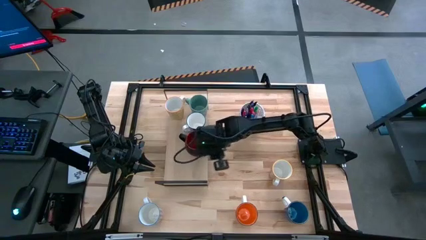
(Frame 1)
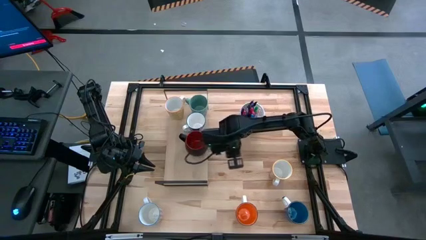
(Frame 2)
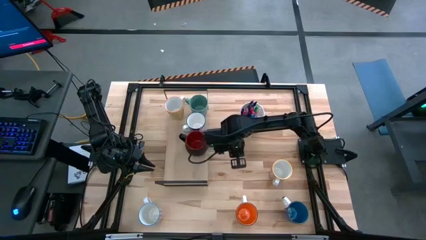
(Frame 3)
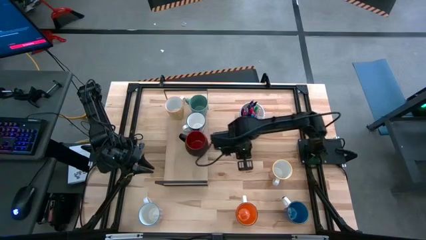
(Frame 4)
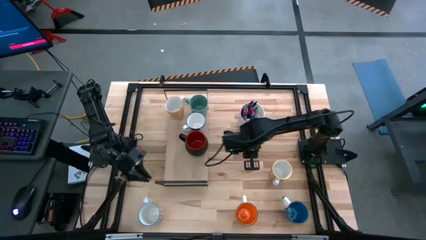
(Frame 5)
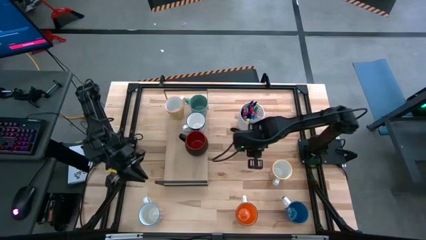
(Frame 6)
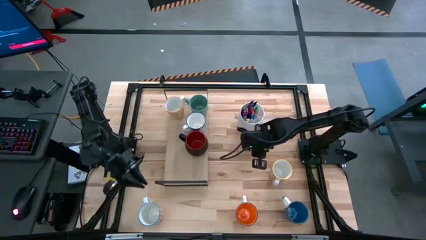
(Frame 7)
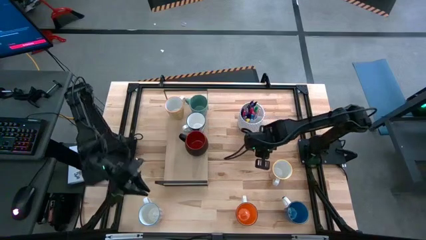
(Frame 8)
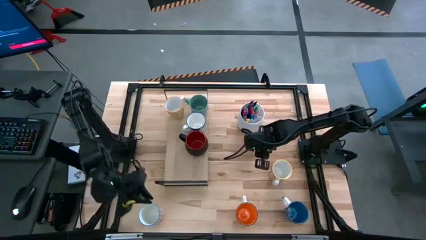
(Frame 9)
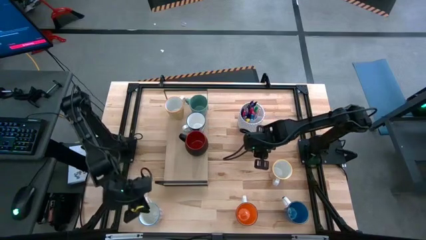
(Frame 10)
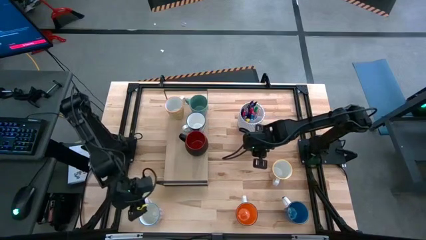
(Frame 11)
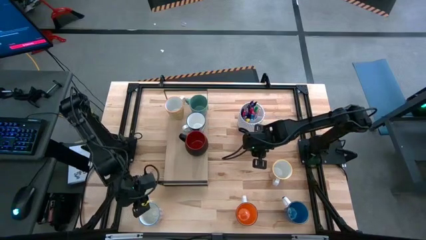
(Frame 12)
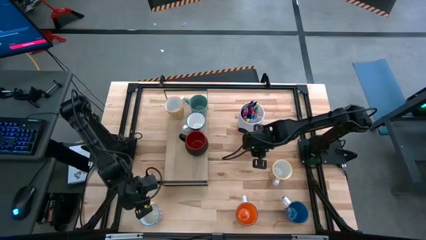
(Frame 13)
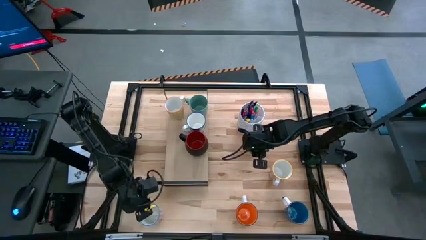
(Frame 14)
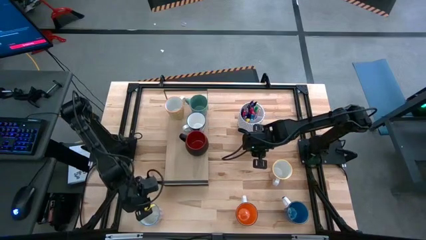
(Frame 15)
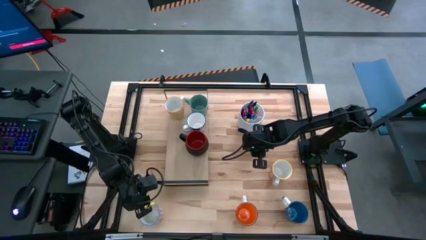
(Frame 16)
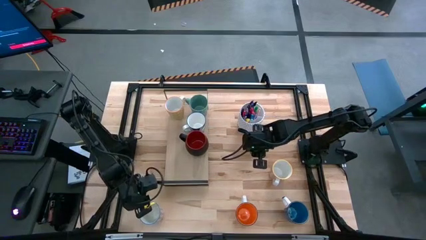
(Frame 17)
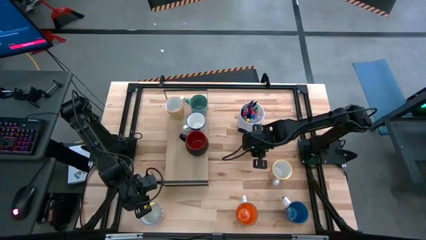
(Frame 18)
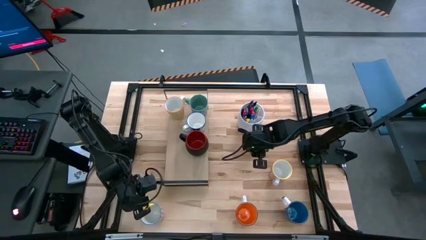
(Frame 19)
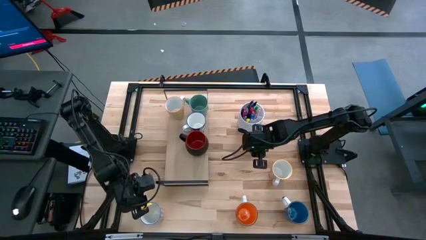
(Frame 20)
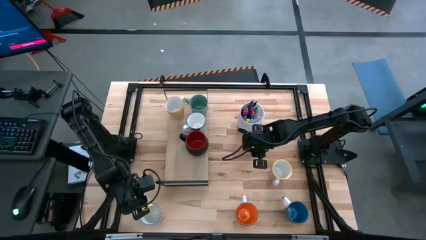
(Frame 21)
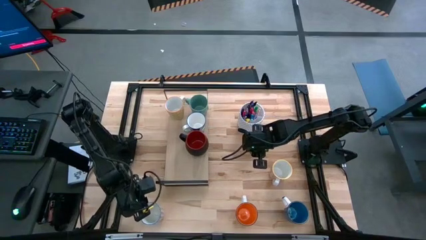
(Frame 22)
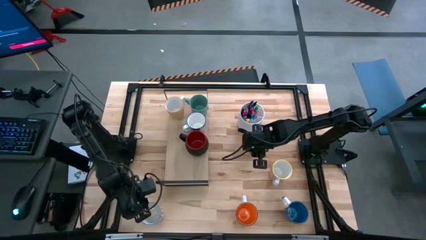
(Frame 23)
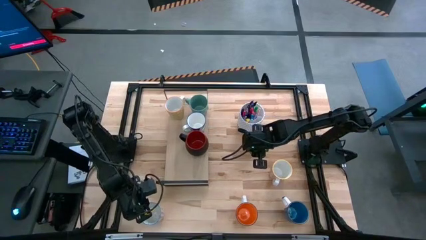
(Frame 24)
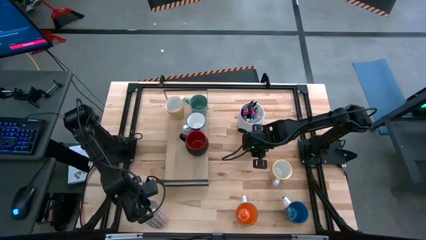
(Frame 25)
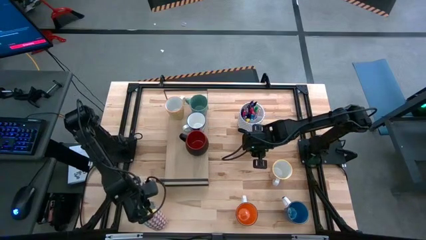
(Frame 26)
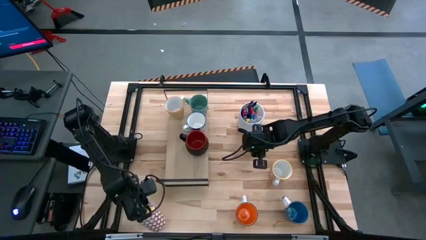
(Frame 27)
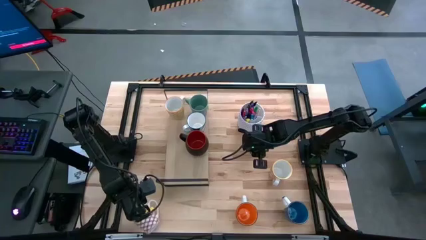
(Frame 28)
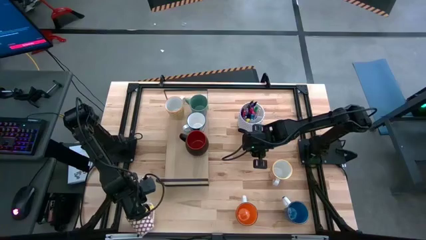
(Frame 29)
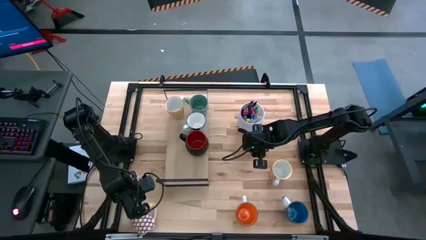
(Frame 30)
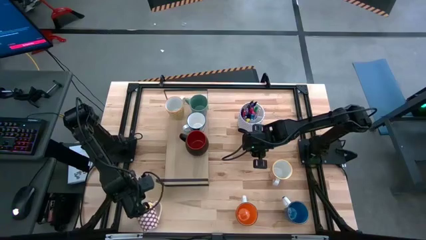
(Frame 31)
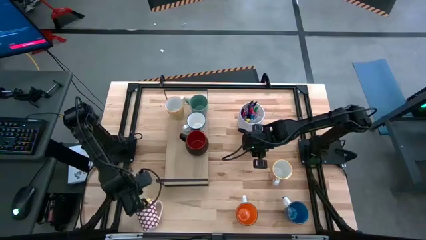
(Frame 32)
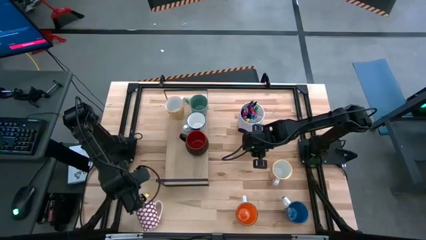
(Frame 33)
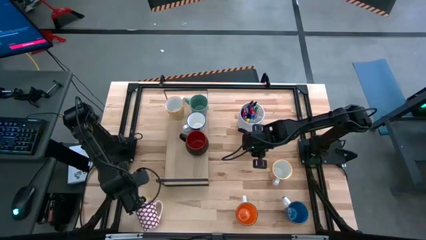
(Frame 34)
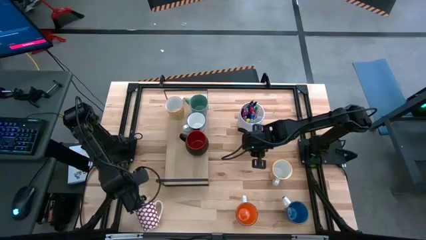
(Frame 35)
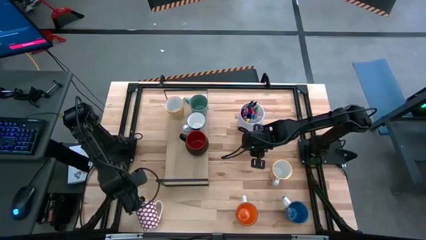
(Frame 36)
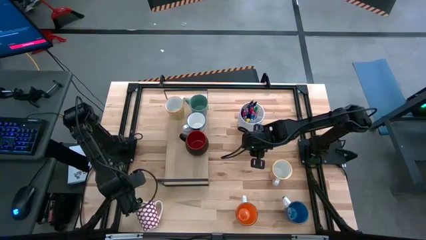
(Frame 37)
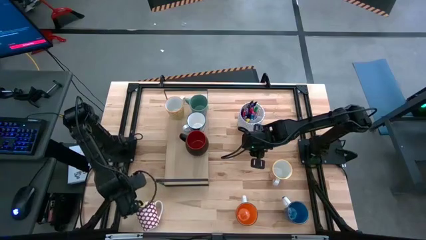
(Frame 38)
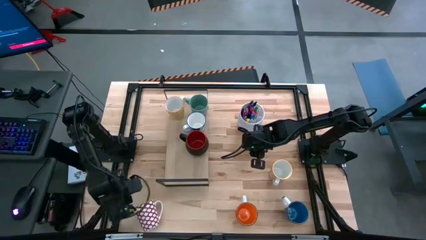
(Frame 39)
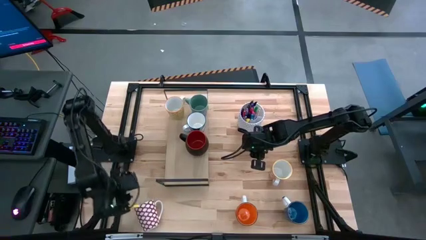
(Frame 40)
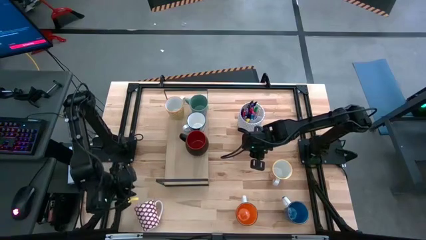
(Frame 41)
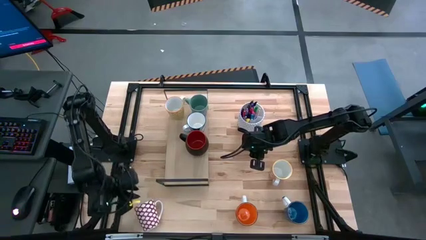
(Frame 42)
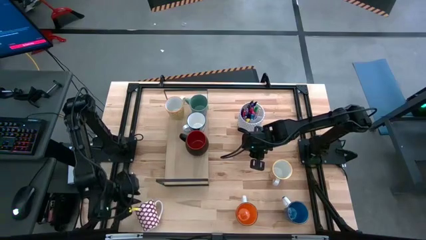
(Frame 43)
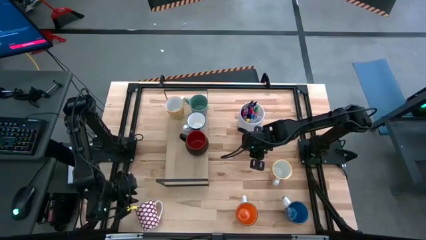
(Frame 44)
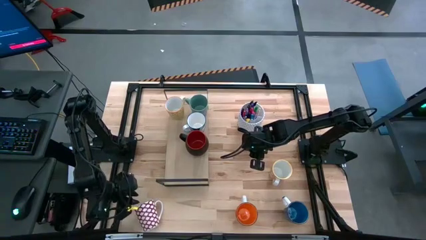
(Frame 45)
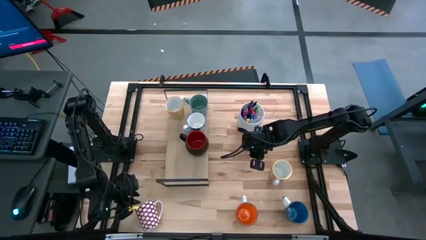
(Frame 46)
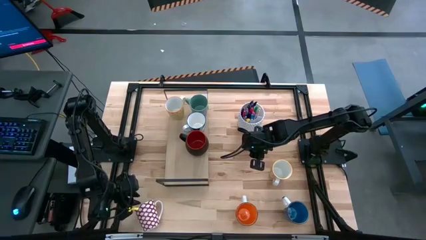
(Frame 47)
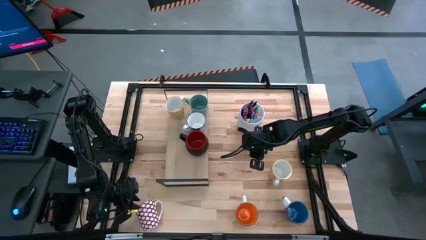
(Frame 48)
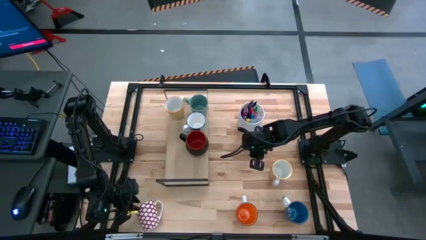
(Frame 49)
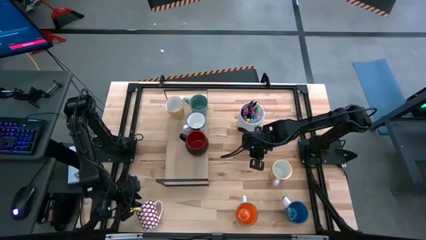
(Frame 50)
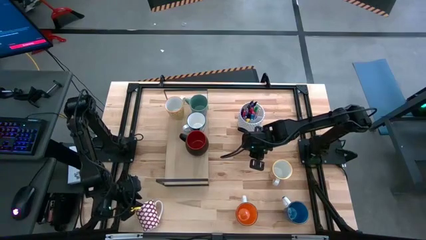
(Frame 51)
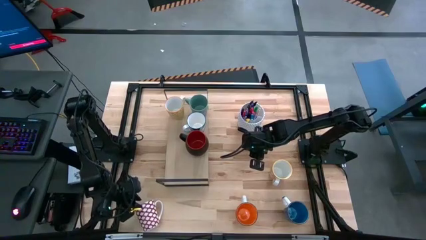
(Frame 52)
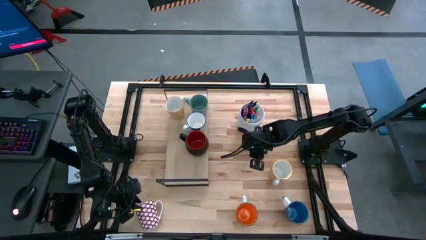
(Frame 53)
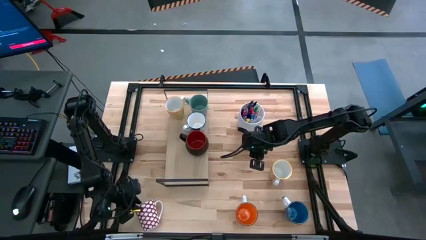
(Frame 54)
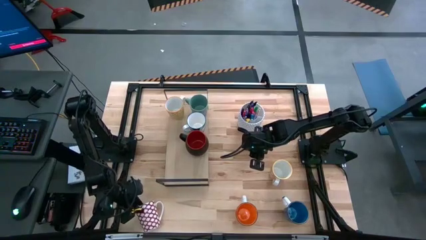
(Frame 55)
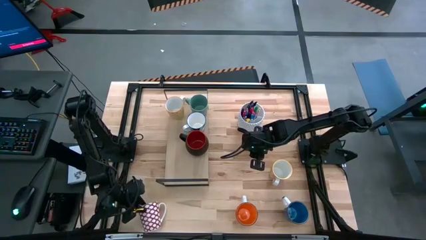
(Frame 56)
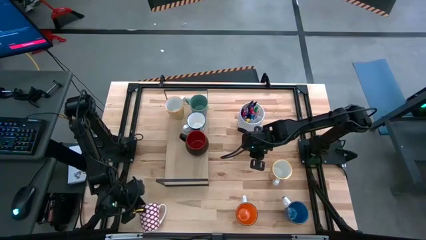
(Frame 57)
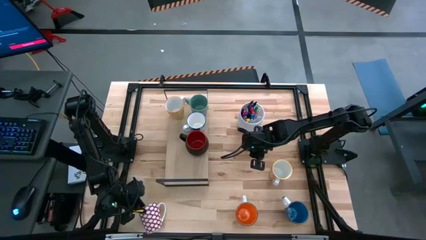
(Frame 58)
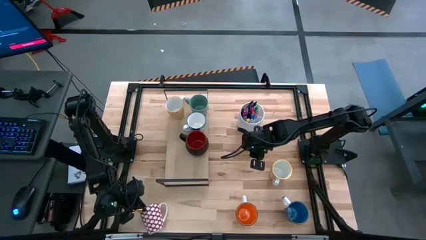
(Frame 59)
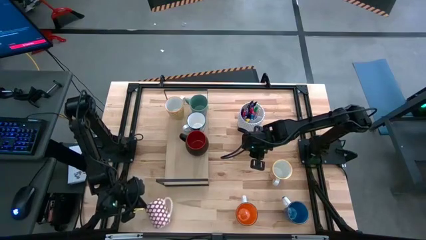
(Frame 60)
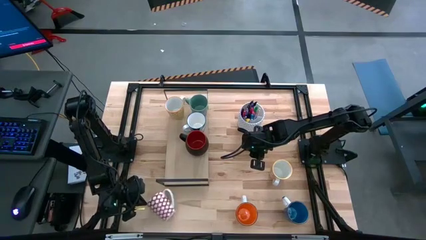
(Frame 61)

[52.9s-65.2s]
Task: Place coffee mugs
Put the red mug on the shelf
